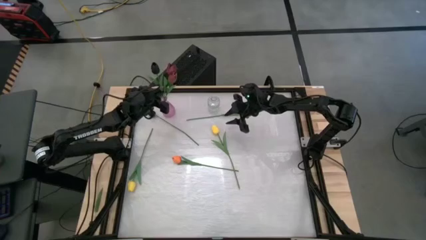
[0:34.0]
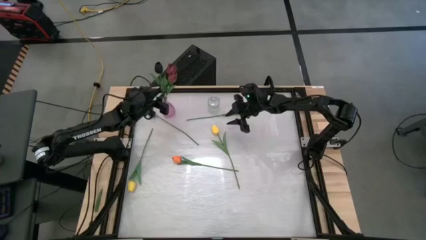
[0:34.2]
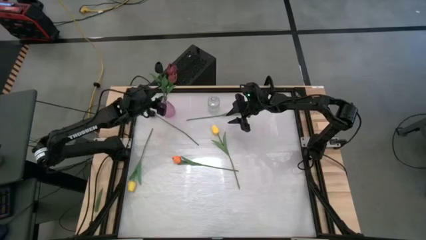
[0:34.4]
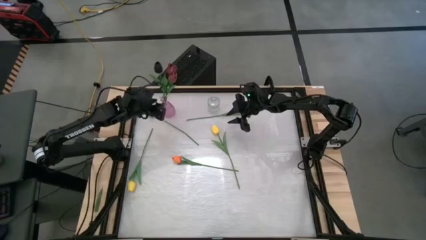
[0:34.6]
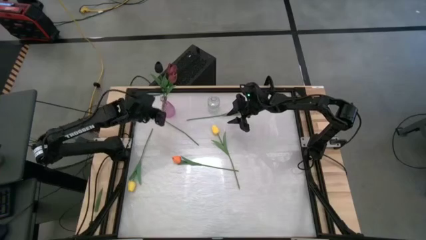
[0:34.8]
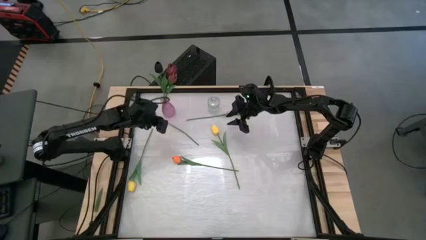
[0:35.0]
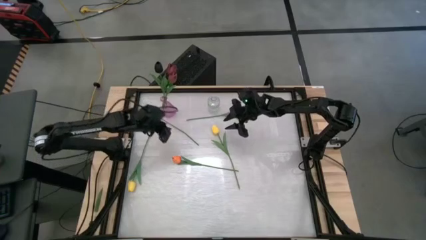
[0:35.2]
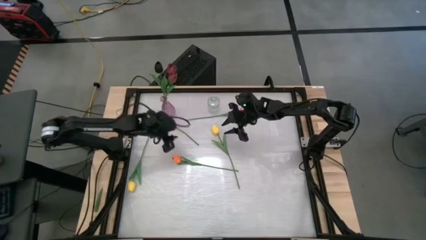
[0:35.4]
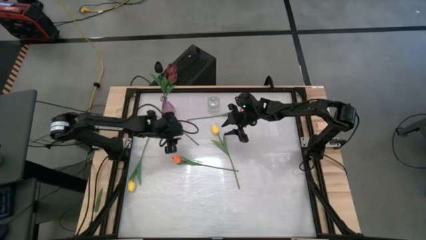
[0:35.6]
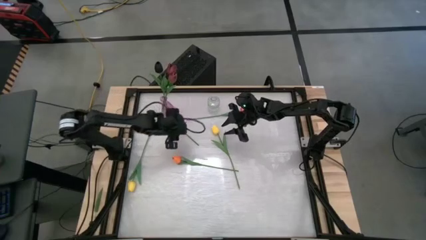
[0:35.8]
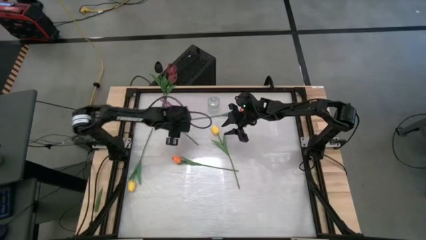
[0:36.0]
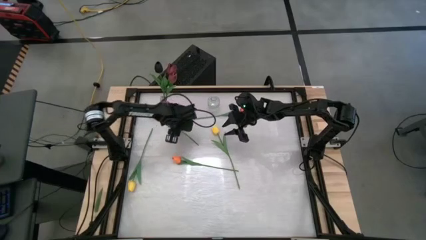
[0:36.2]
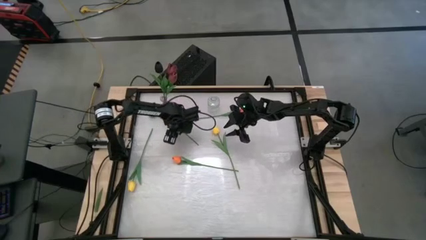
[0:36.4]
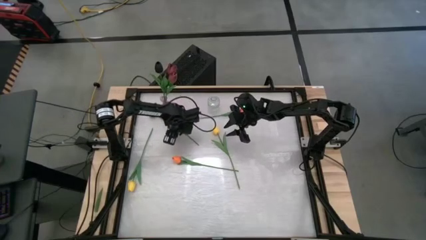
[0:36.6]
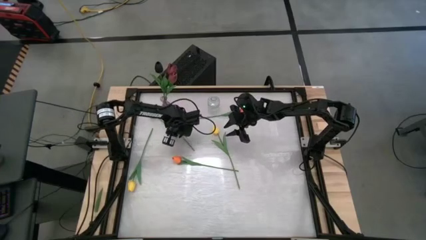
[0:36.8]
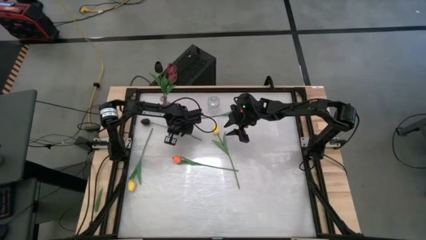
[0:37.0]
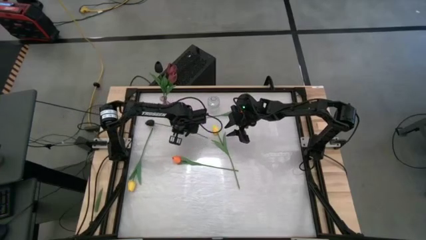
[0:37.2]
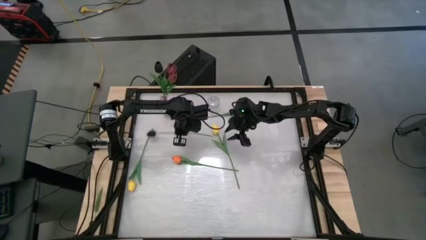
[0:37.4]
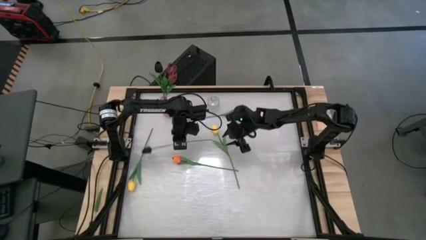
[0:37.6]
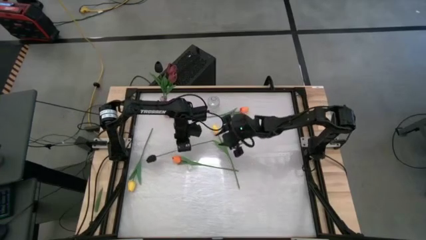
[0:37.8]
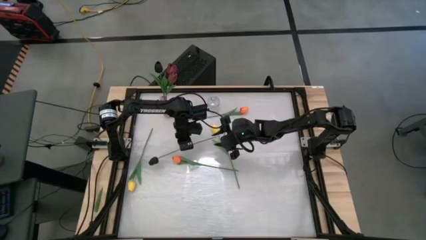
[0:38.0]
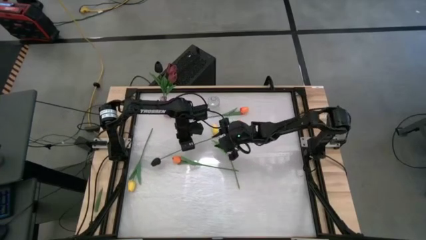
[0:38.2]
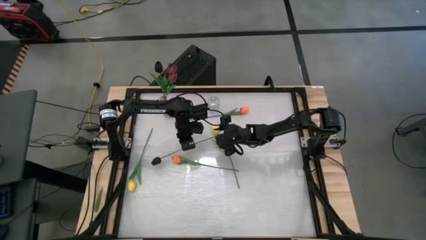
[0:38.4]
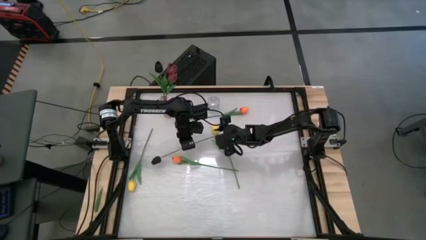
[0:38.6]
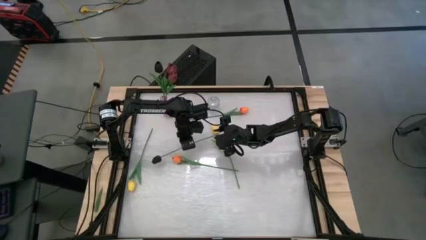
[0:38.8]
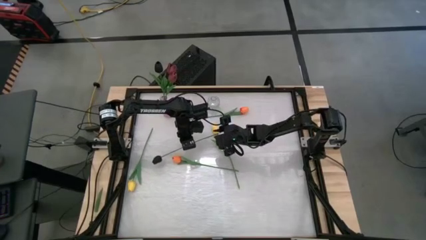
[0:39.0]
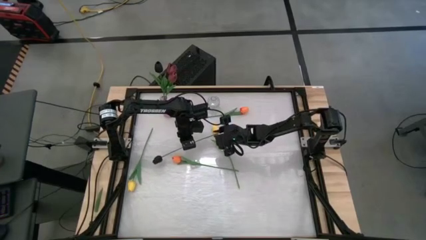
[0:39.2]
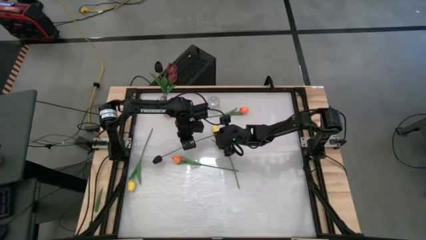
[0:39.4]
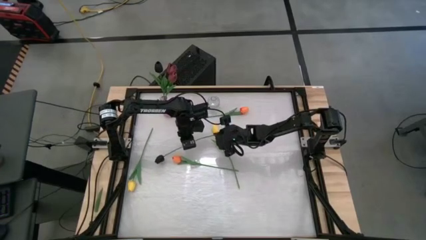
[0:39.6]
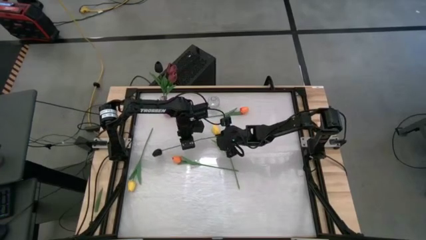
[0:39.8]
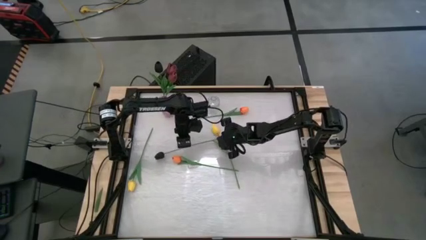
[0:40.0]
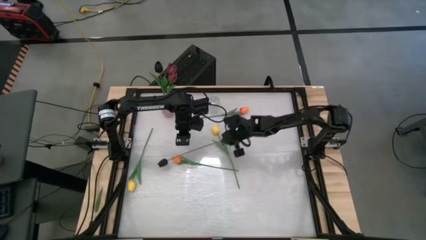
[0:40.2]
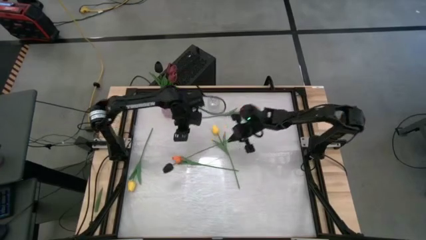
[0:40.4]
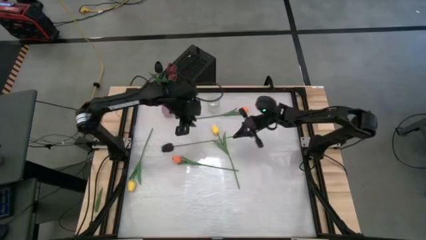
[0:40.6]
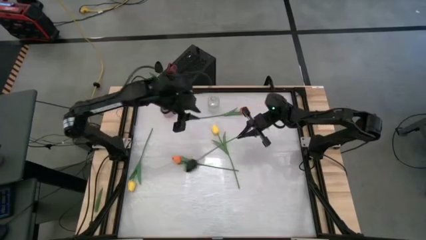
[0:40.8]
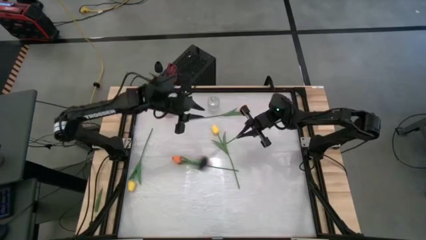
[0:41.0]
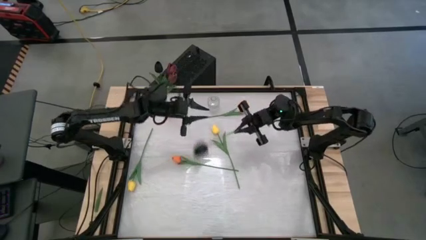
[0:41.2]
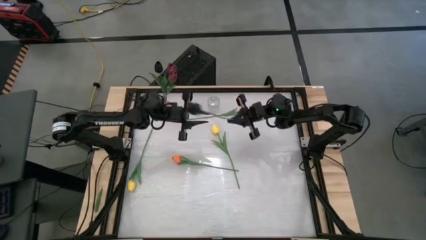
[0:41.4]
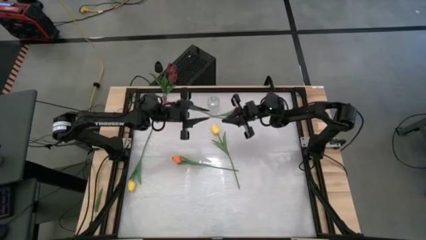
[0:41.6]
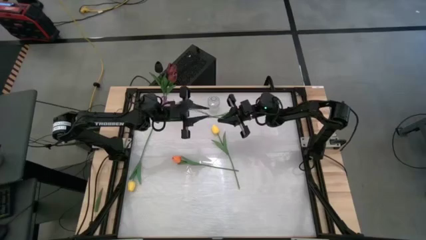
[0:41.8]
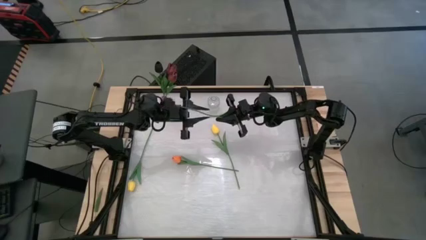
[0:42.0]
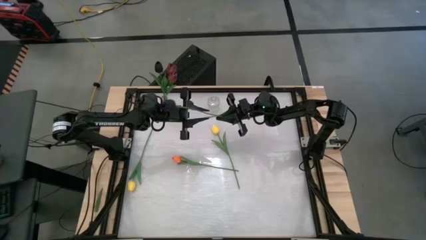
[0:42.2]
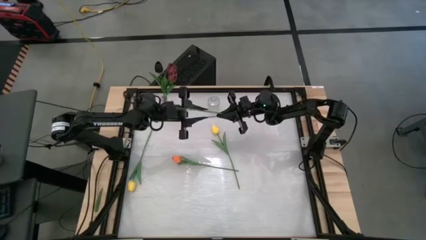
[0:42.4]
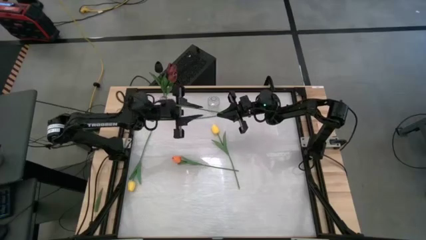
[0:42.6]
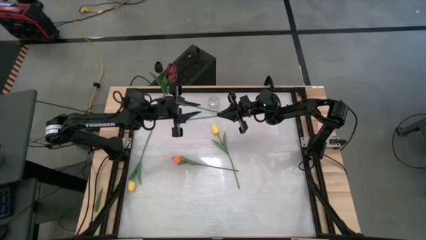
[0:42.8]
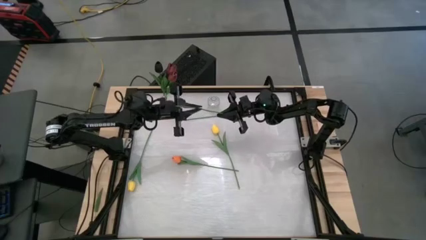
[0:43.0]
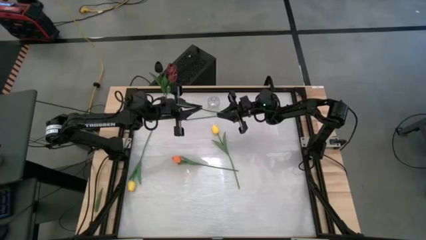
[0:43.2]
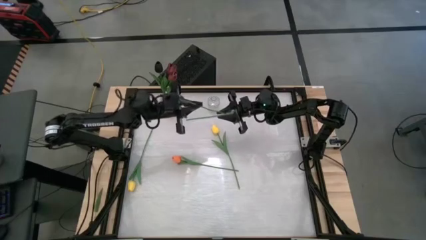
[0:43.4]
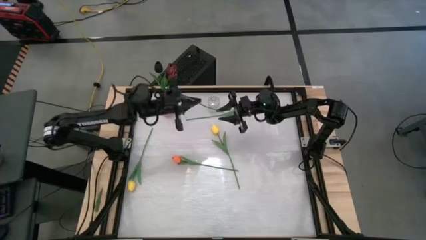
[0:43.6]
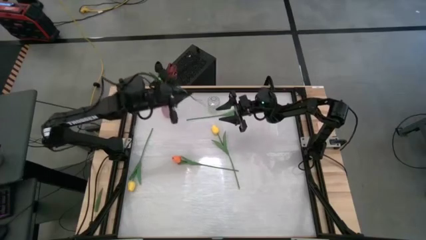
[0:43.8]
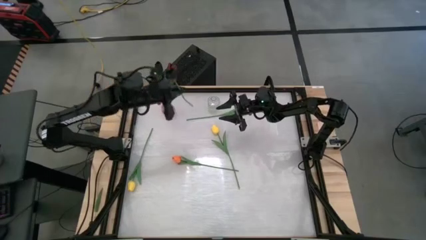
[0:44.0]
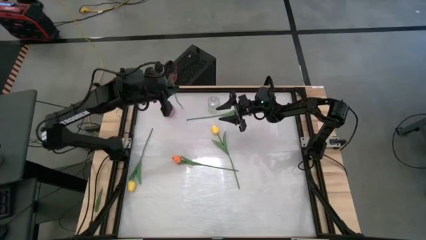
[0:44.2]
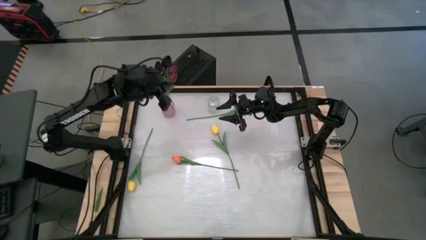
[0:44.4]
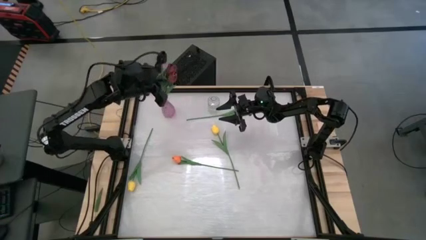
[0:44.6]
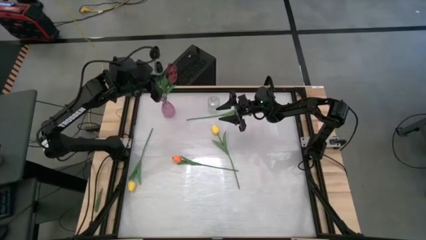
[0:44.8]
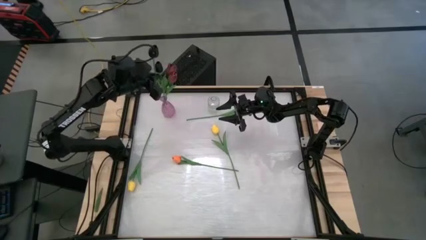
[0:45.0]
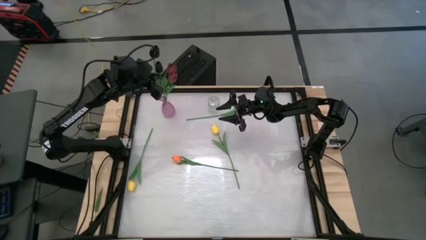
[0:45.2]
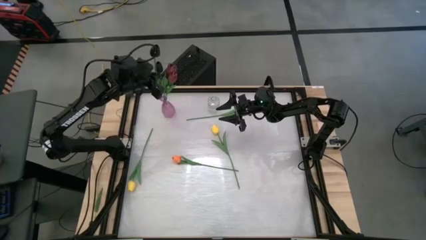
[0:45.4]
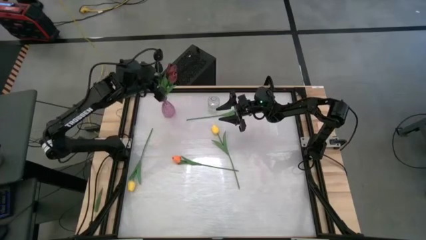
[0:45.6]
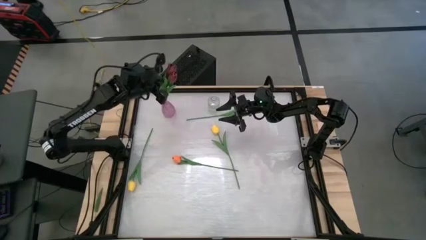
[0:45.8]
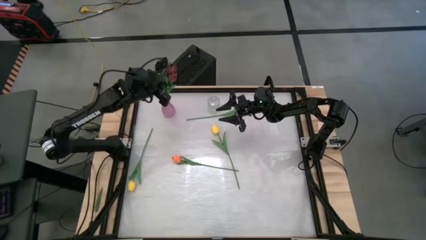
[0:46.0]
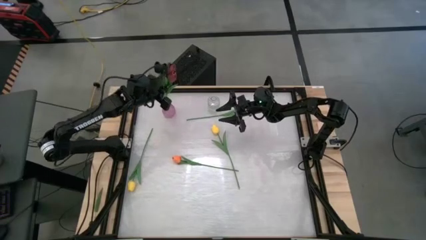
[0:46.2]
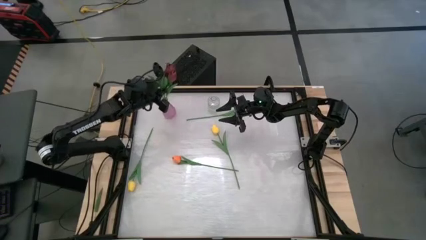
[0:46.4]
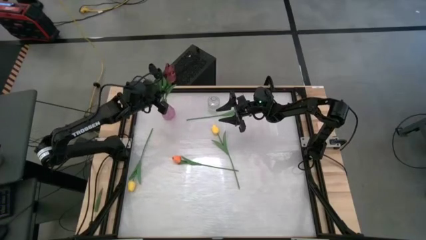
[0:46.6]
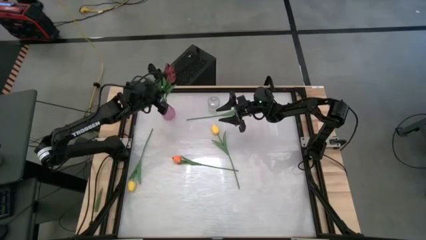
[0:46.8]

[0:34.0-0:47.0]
Task: Sort flowers into vase by color
Put the black flower into the purple vase

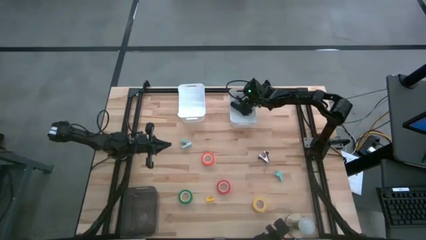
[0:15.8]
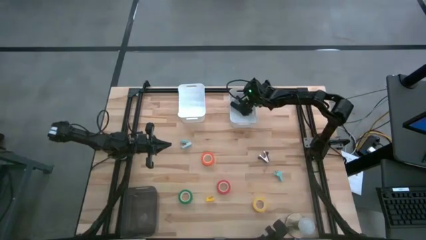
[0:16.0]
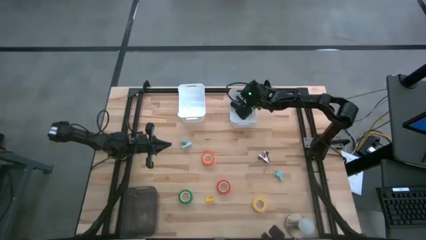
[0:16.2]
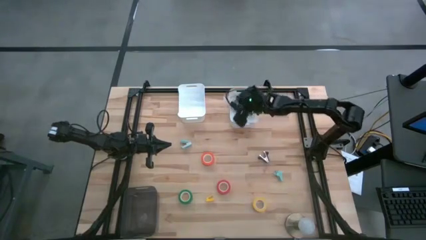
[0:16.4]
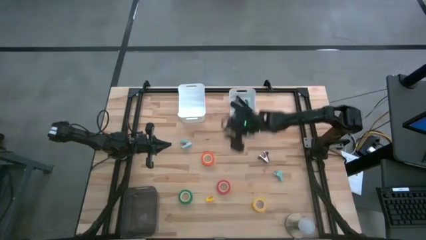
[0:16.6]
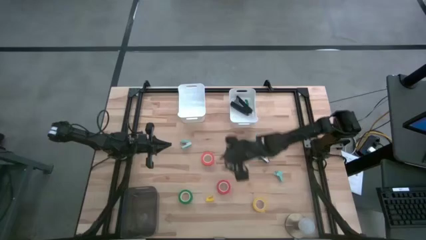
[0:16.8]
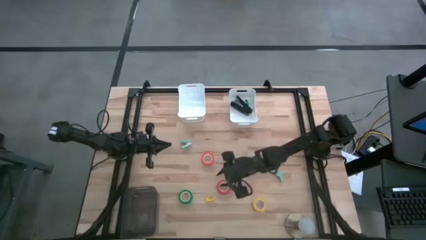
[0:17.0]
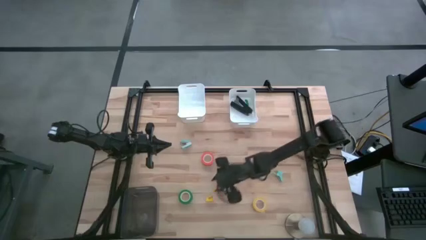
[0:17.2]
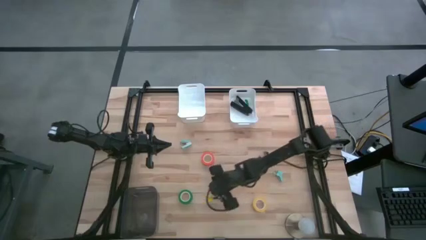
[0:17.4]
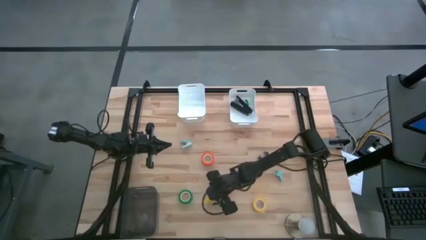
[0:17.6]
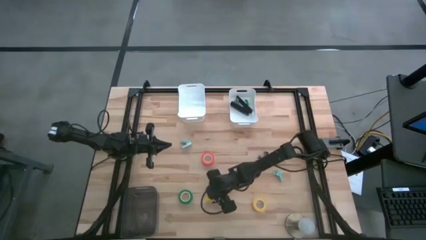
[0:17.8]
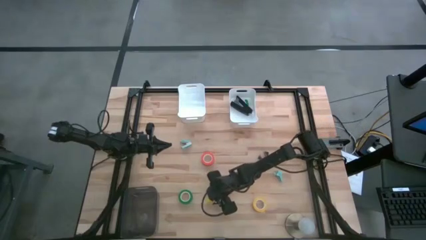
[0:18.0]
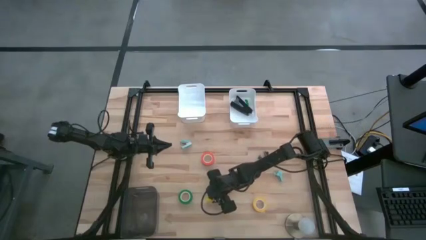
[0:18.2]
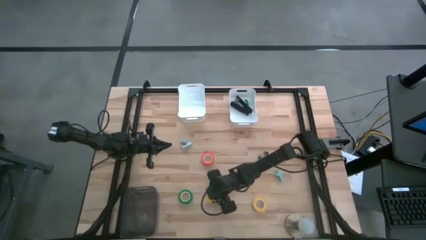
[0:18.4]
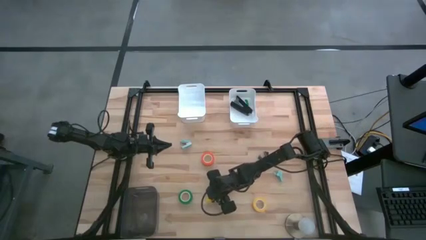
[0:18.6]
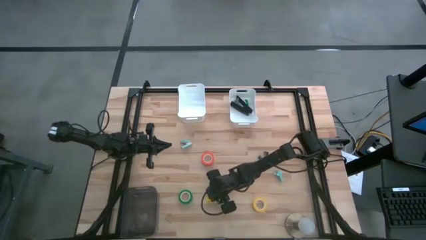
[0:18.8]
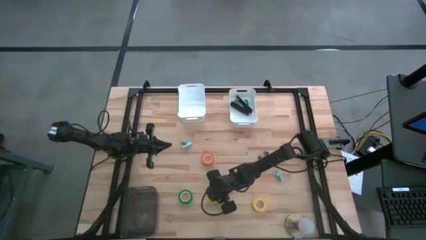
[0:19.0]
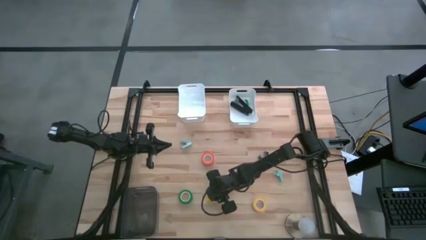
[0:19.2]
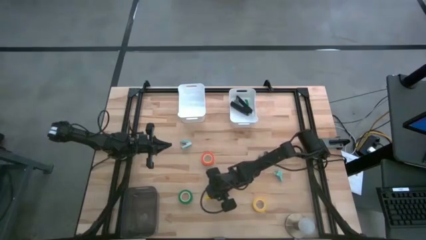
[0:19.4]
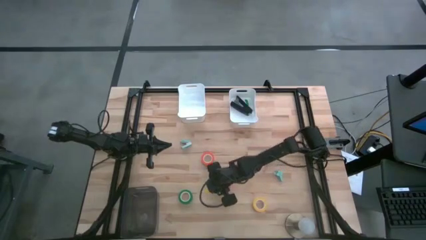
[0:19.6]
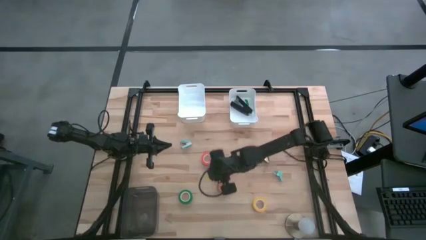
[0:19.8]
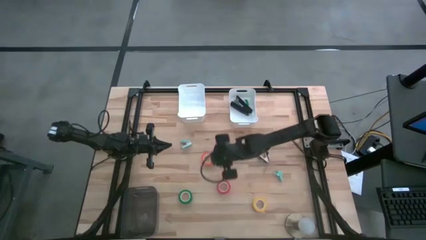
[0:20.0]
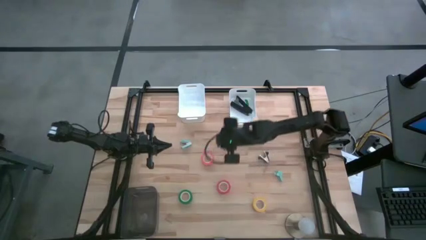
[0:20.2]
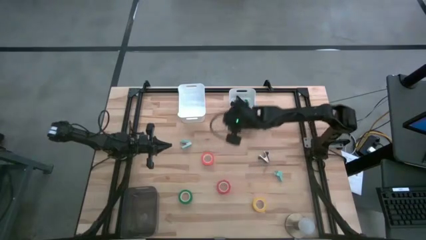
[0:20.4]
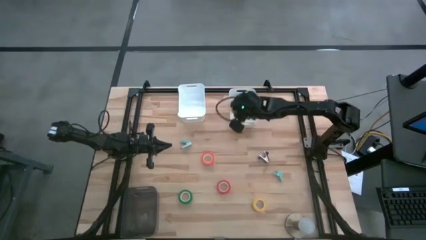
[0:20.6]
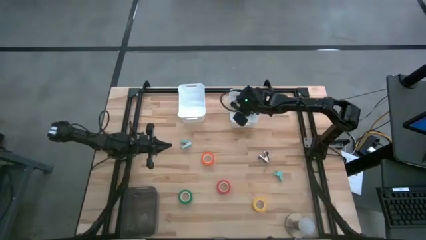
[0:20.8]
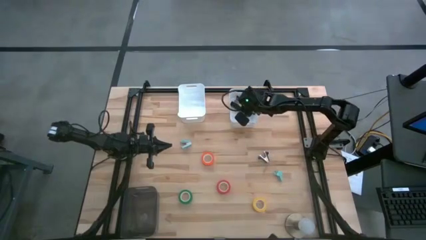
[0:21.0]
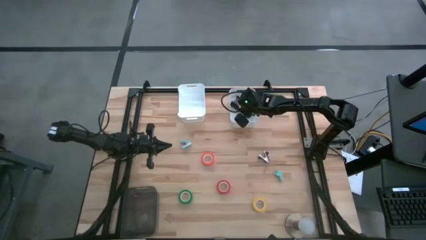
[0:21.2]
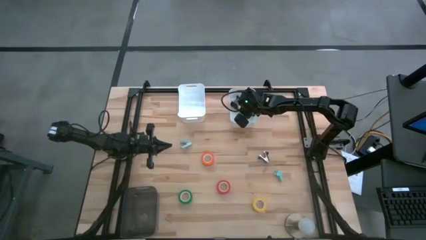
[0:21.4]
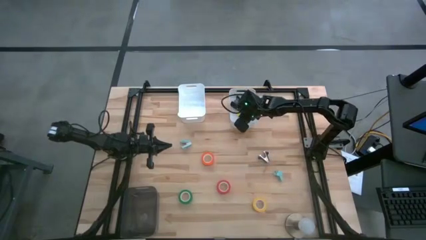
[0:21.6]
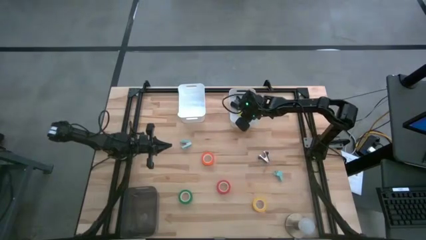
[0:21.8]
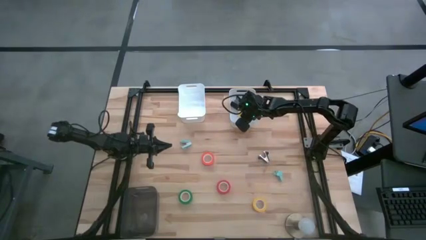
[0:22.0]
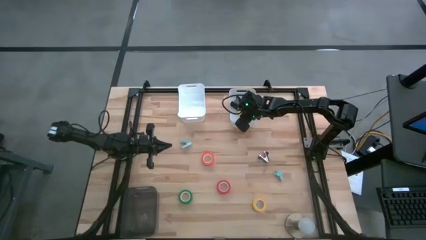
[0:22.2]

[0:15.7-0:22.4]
Task: Pick and place Stapler, Stapler remover, tape
Put the yellow stapler into the right white bin
